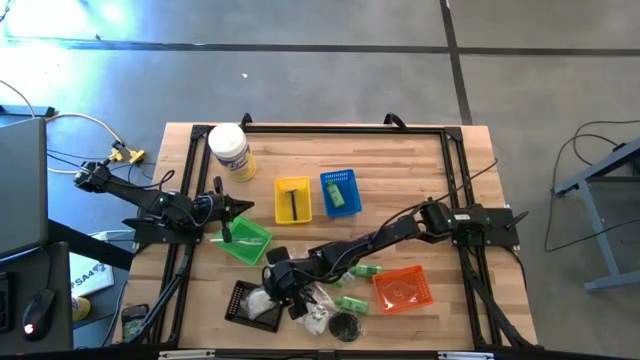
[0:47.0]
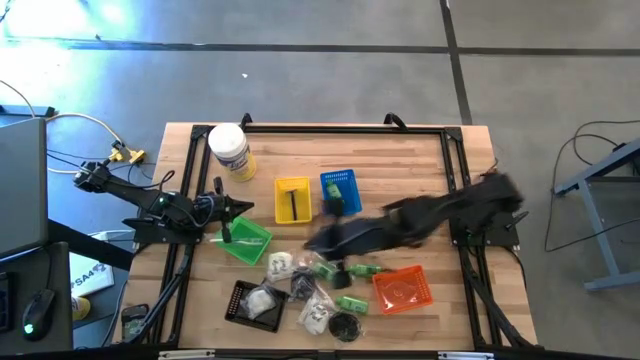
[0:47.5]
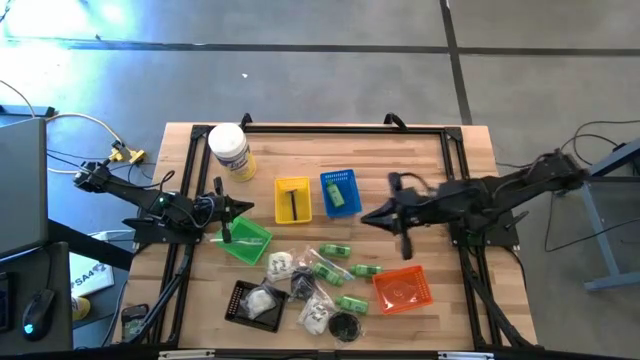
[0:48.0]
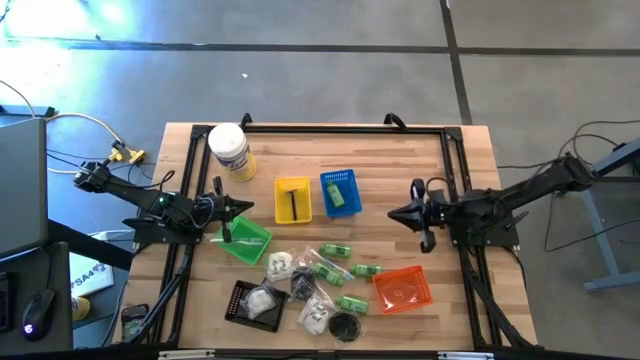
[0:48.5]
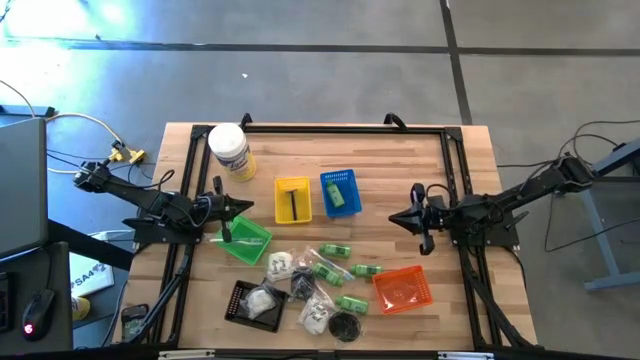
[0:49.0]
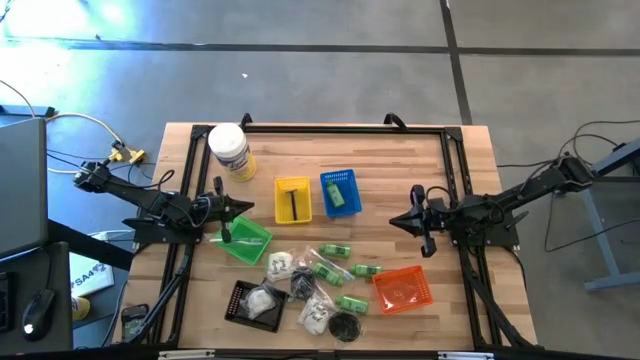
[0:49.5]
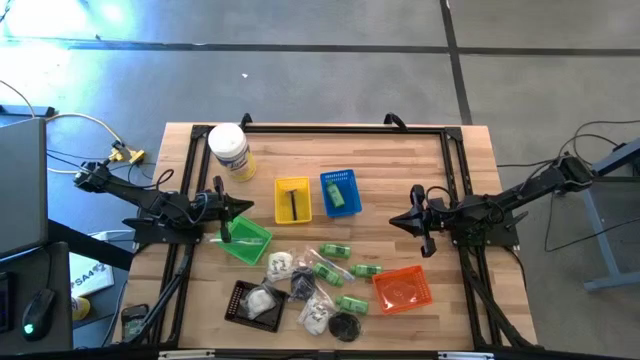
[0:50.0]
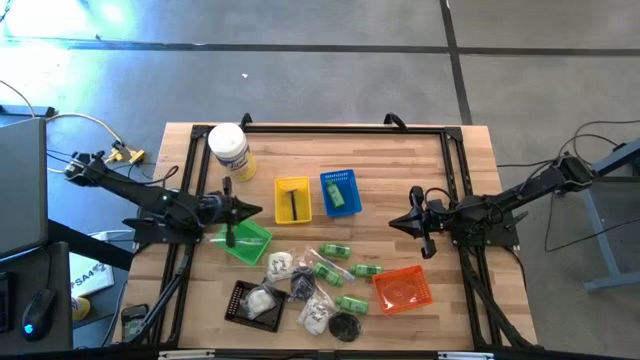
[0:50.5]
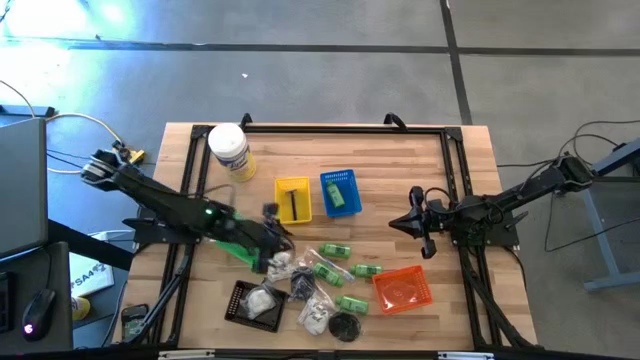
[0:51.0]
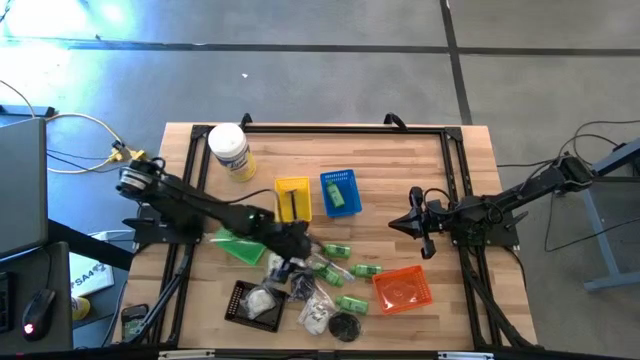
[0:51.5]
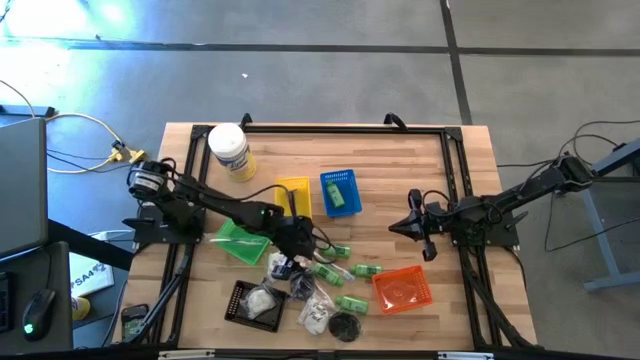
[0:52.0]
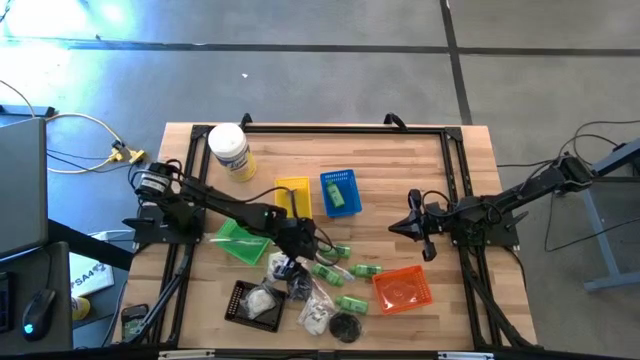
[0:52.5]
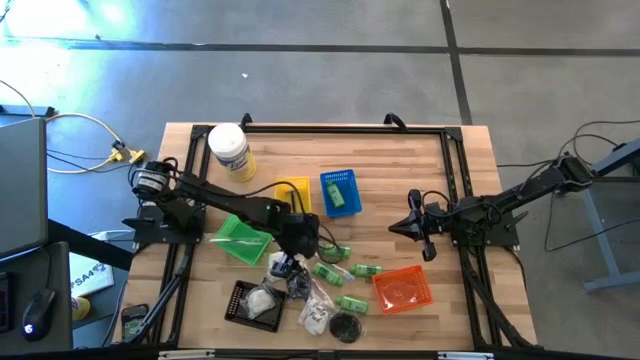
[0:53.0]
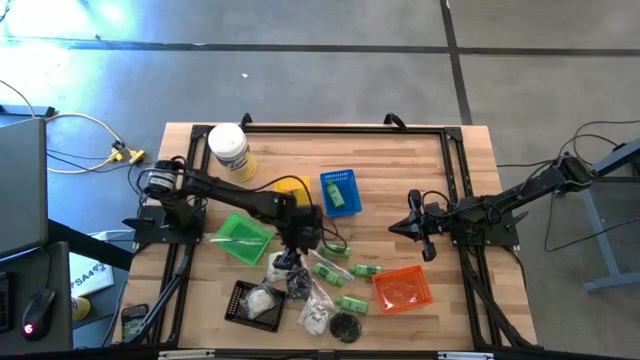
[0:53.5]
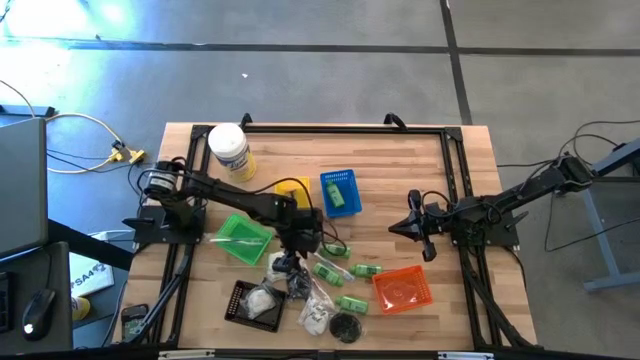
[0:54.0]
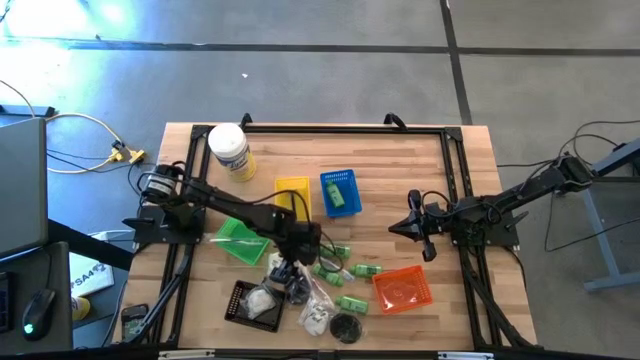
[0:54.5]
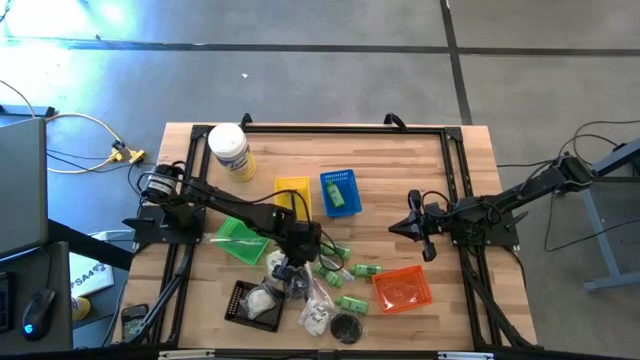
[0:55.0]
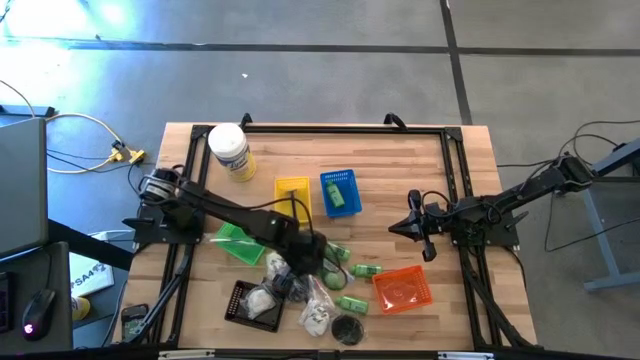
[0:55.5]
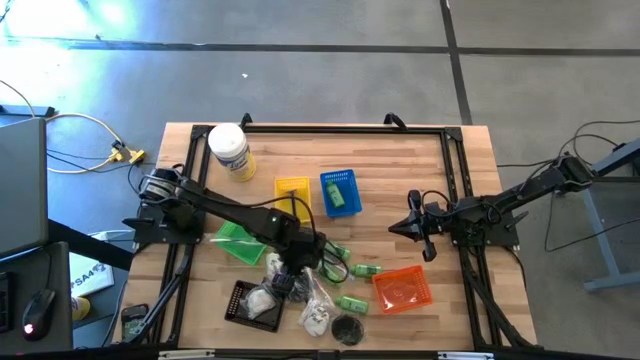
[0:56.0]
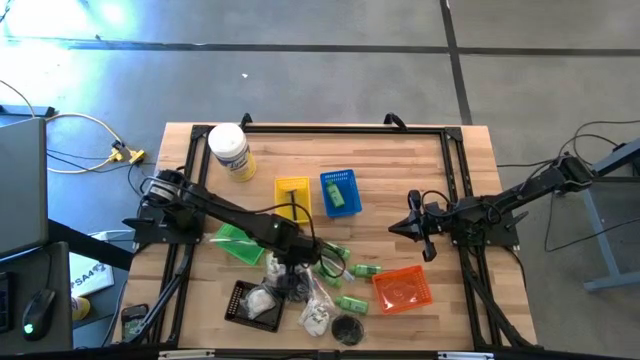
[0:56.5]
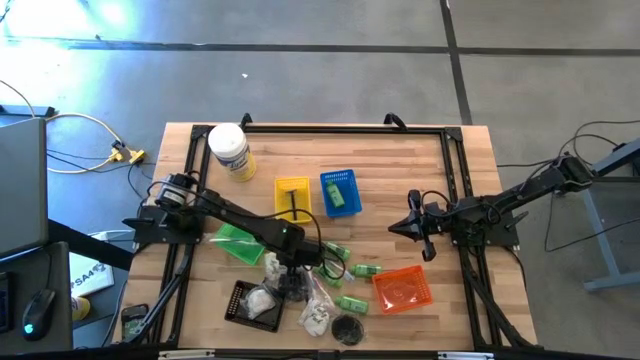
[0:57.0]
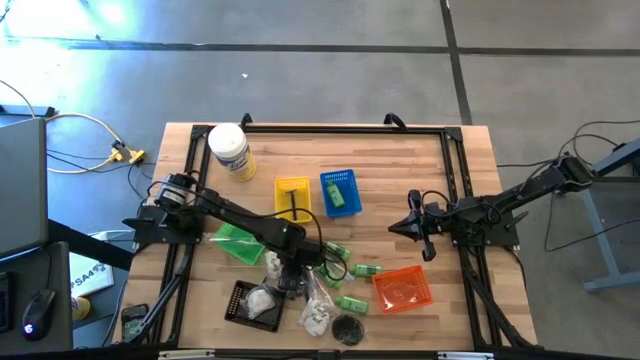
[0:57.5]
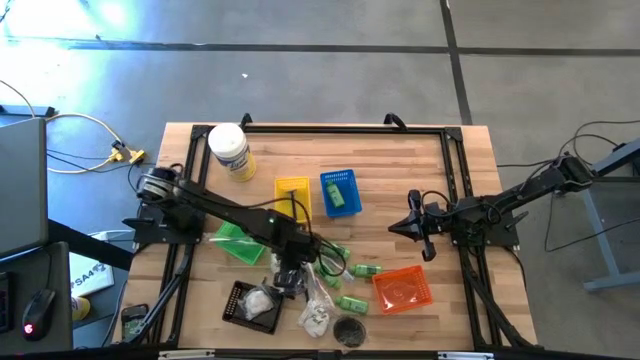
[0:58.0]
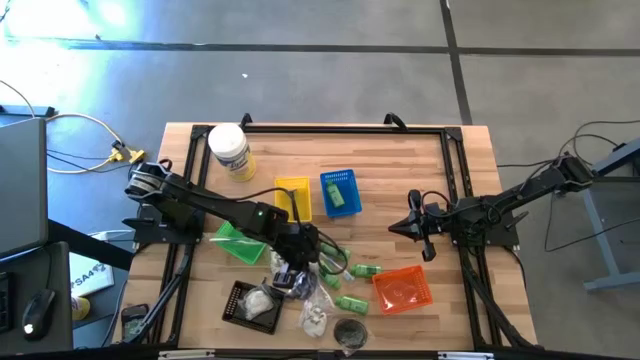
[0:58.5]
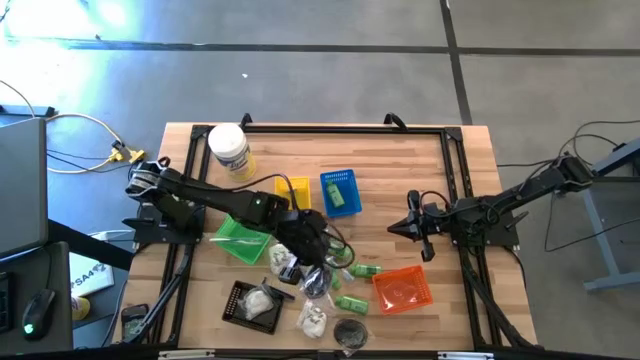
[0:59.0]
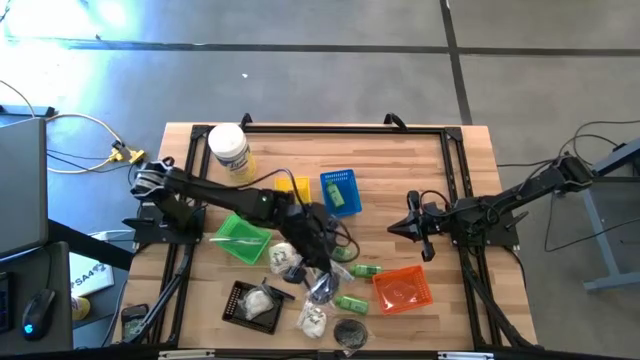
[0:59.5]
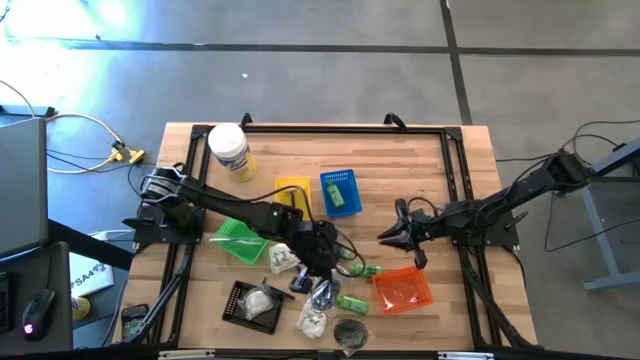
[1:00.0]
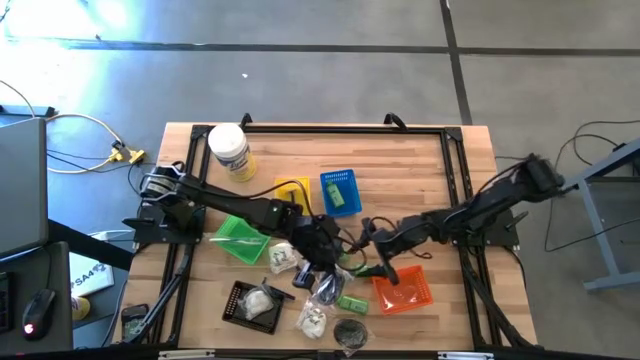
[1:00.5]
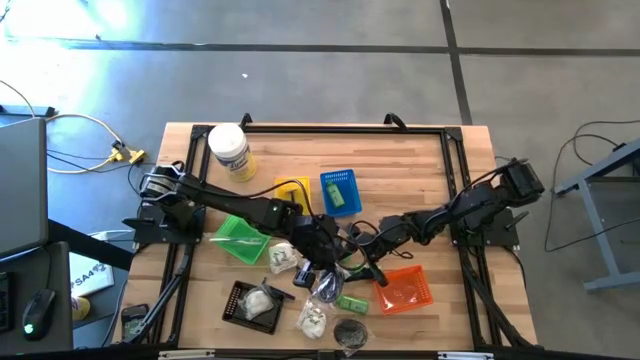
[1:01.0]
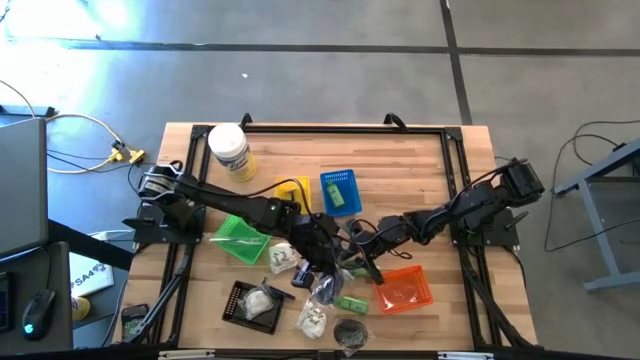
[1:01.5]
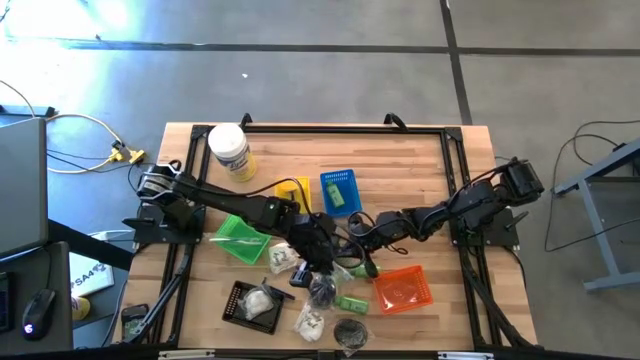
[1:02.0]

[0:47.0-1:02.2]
Task: Pick & Place Travel size toiletries
Put the hairbrush into the orange bin

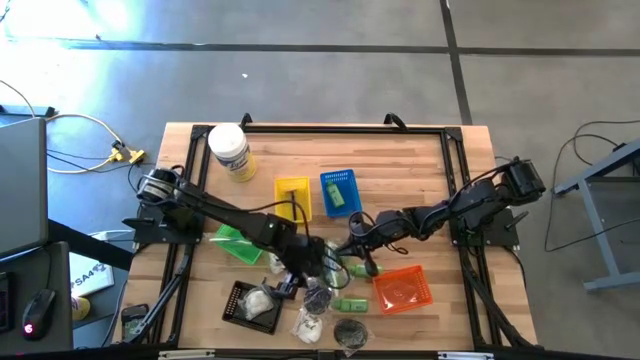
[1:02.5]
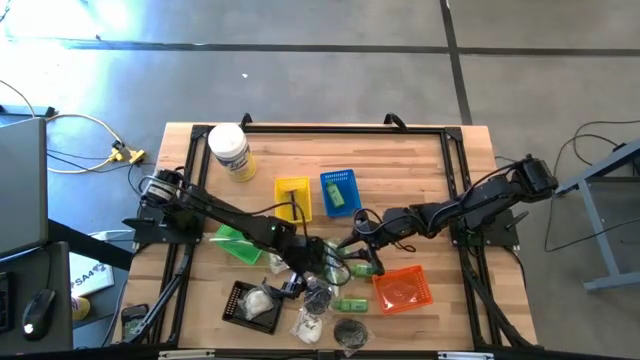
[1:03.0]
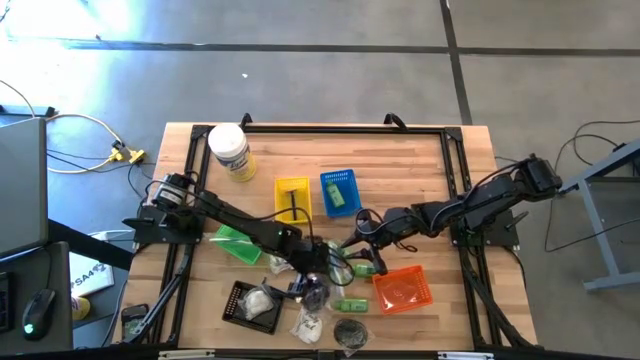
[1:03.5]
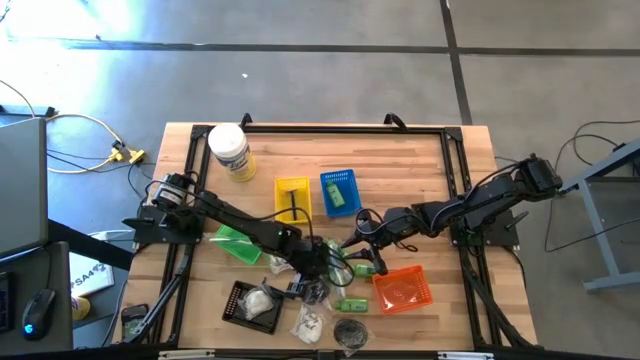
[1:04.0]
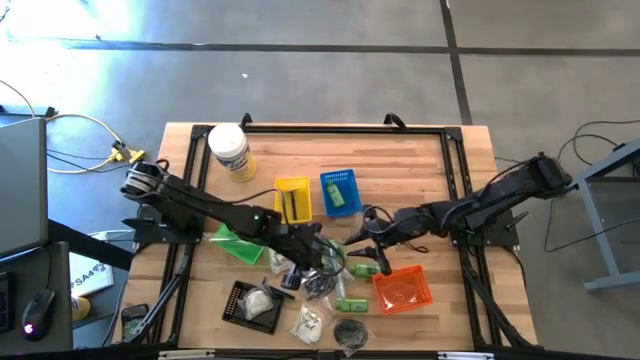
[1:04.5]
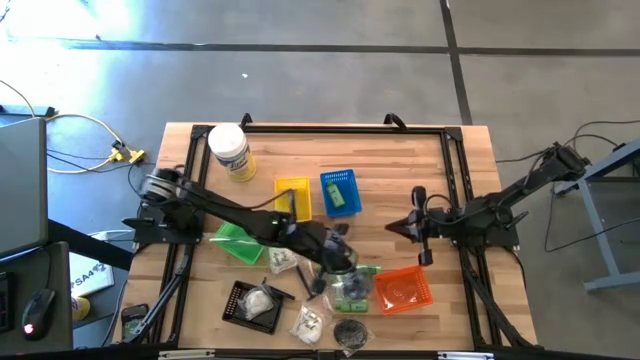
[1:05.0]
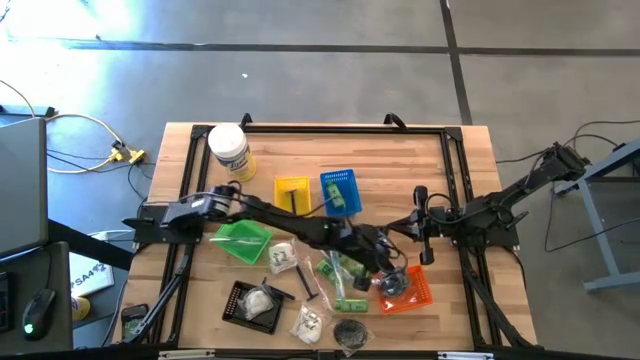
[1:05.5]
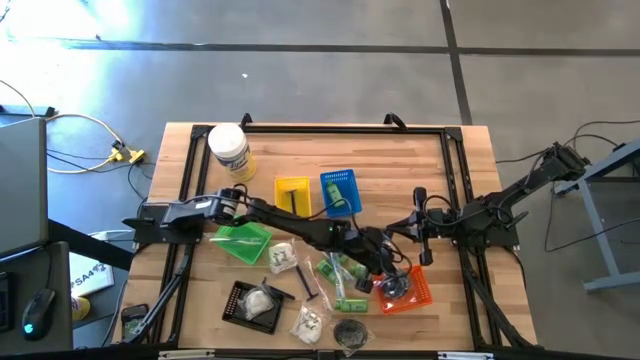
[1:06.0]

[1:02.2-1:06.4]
Put the hairbrush into the orange bin

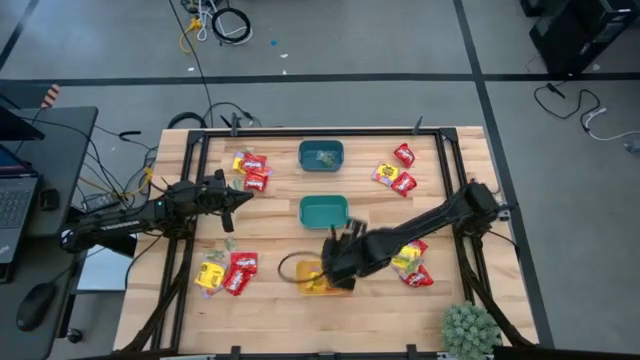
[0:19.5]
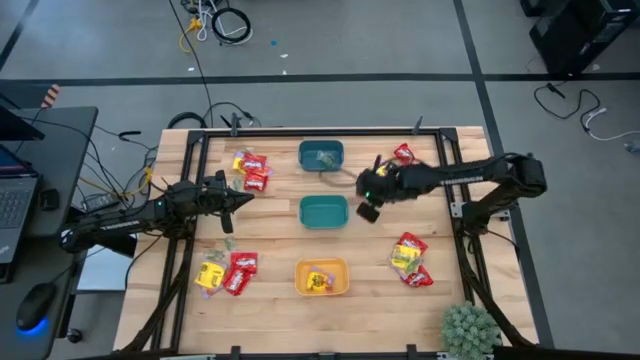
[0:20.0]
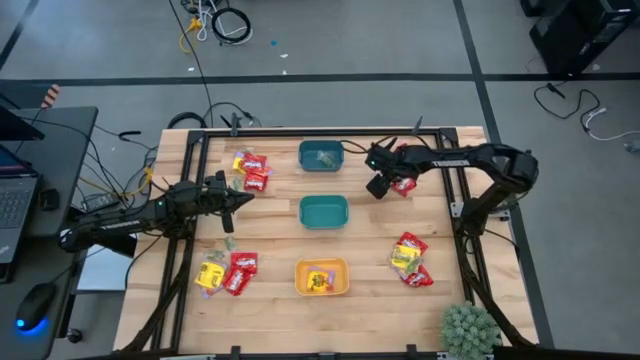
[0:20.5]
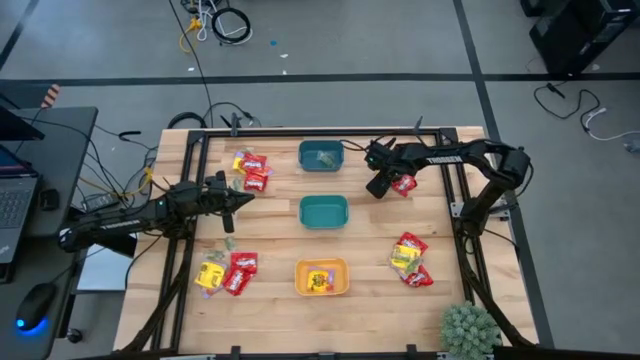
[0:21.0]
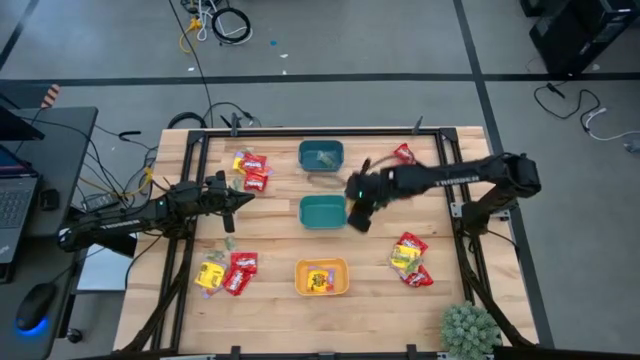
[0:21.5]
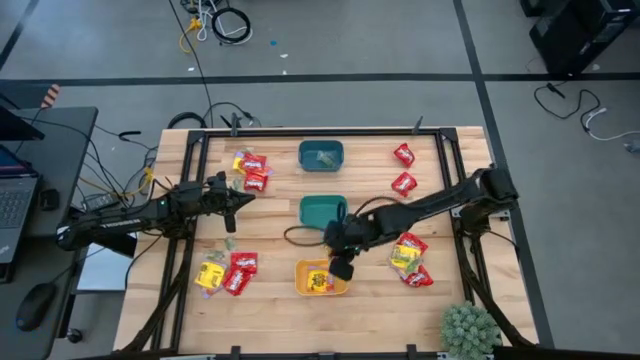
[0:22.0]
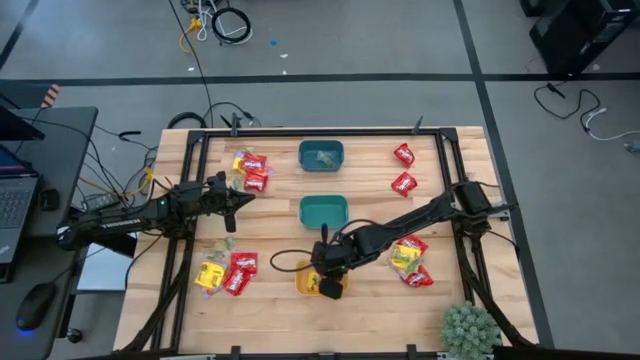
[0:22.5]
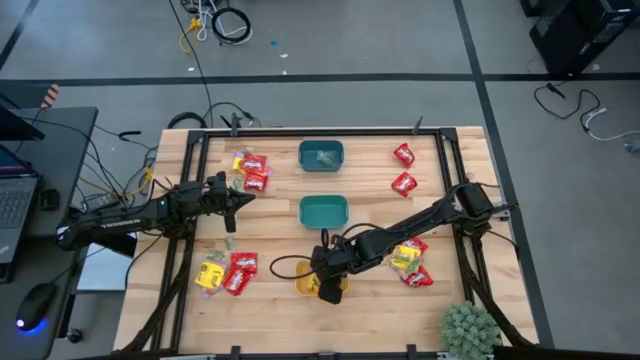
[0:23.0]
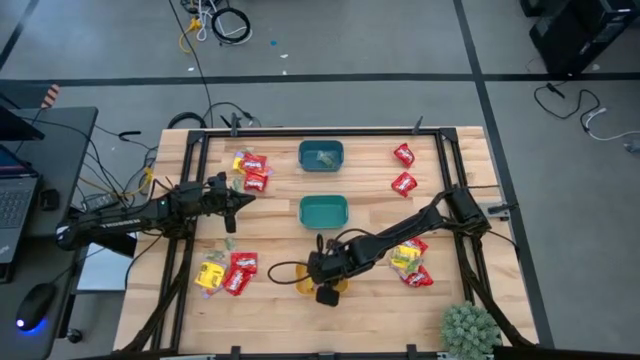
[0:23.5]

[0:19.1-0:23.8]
Task: Sort candy
Put the yellow candy into the yellow bin
